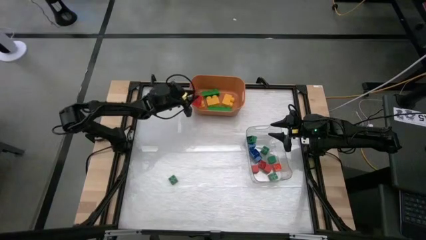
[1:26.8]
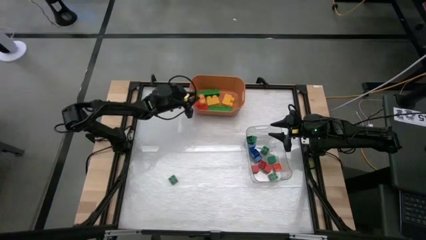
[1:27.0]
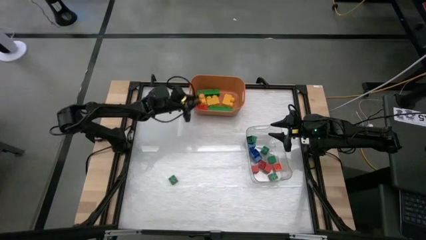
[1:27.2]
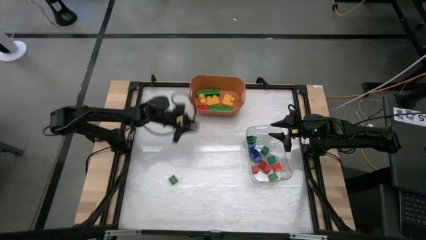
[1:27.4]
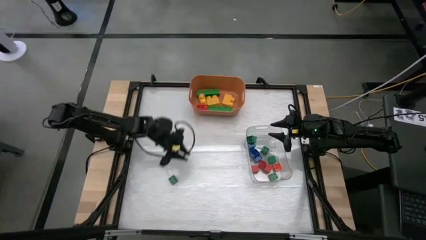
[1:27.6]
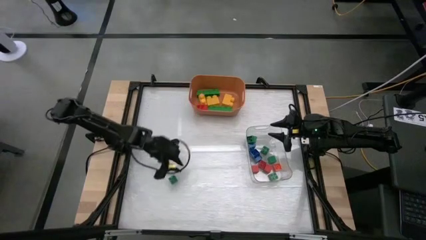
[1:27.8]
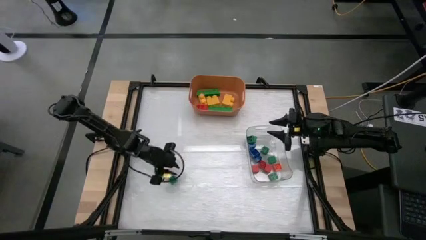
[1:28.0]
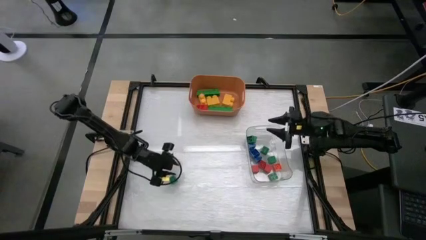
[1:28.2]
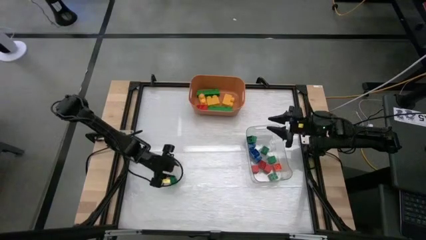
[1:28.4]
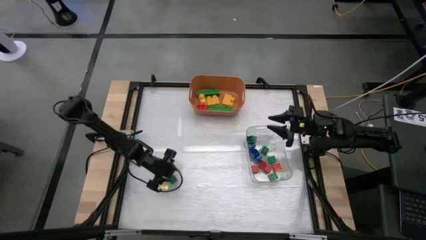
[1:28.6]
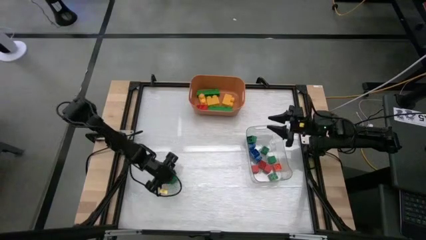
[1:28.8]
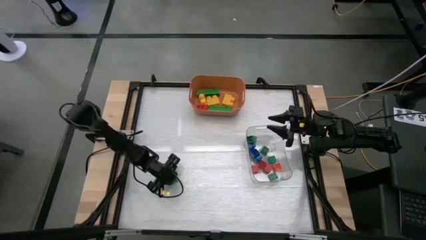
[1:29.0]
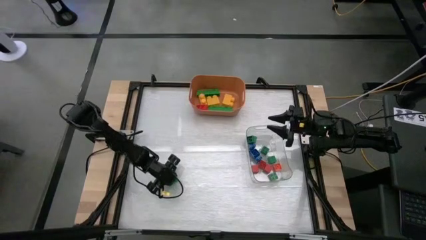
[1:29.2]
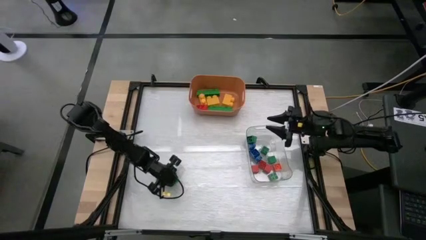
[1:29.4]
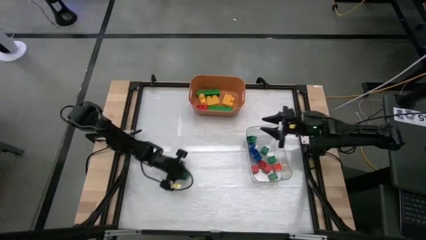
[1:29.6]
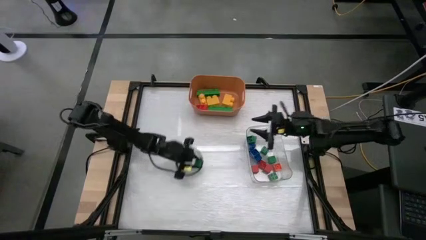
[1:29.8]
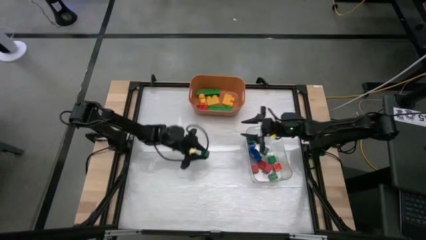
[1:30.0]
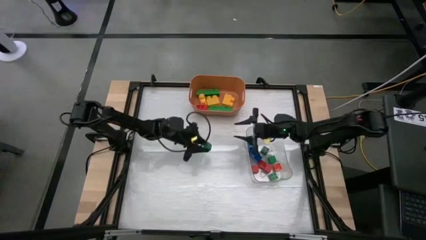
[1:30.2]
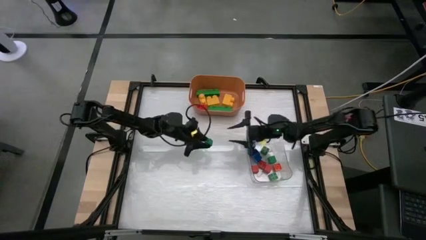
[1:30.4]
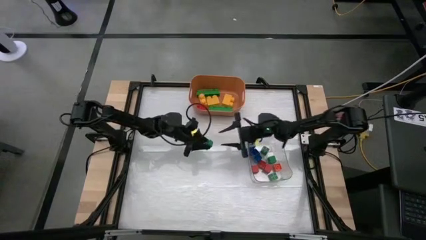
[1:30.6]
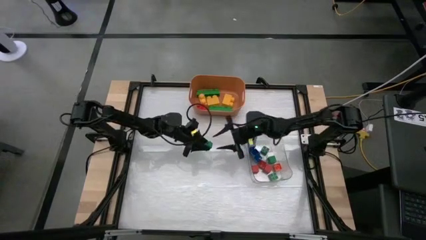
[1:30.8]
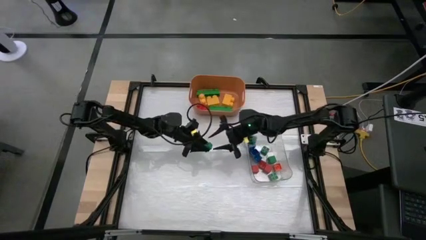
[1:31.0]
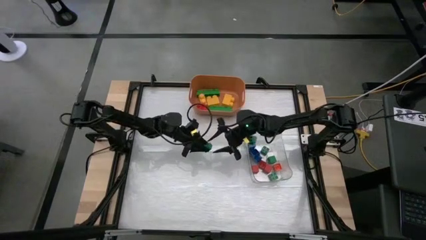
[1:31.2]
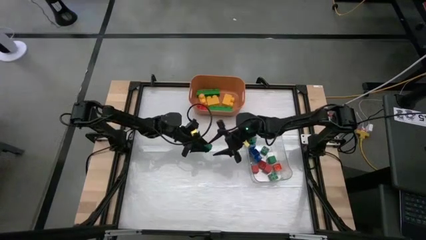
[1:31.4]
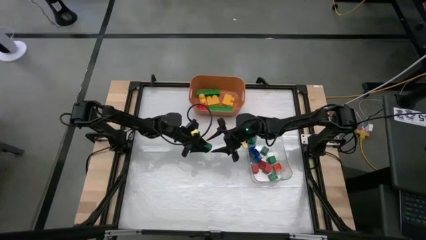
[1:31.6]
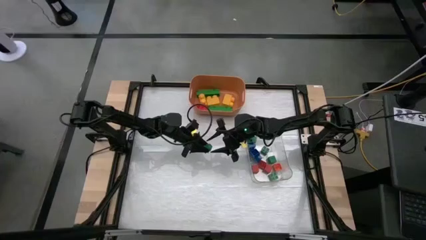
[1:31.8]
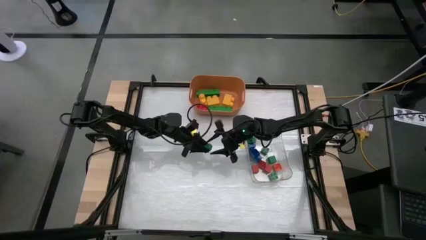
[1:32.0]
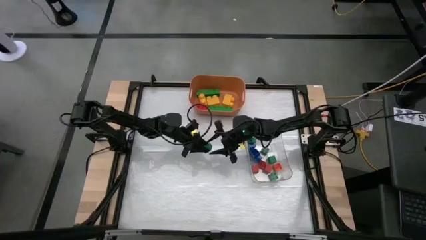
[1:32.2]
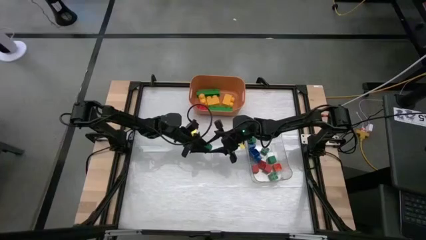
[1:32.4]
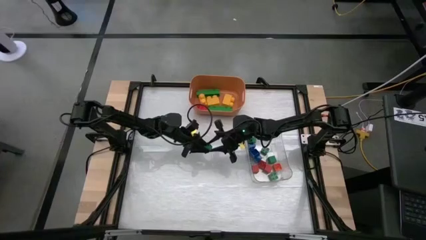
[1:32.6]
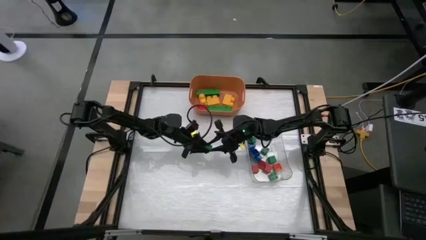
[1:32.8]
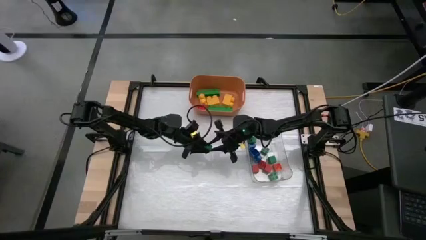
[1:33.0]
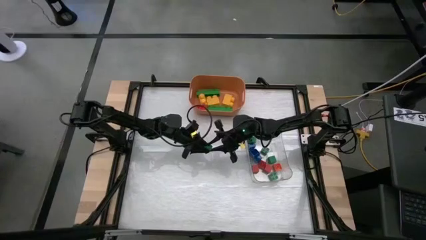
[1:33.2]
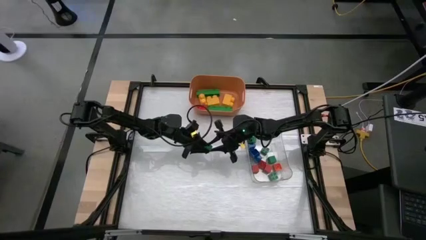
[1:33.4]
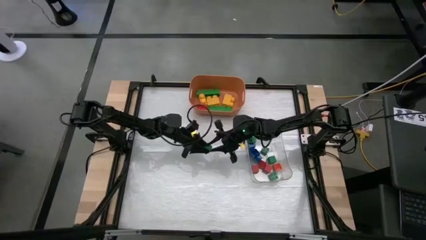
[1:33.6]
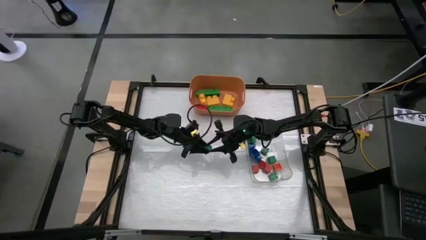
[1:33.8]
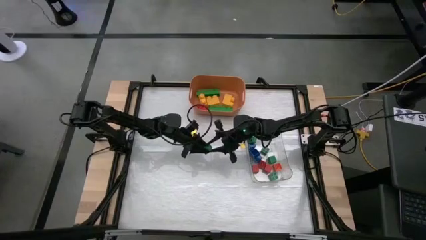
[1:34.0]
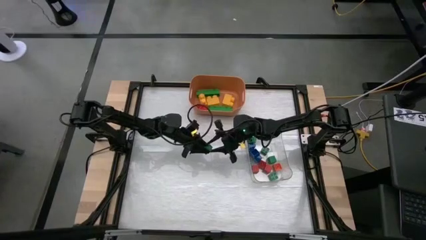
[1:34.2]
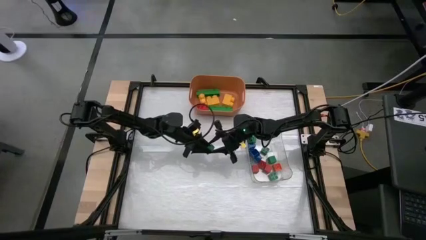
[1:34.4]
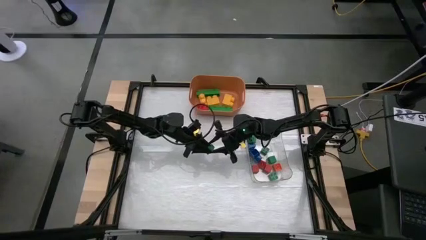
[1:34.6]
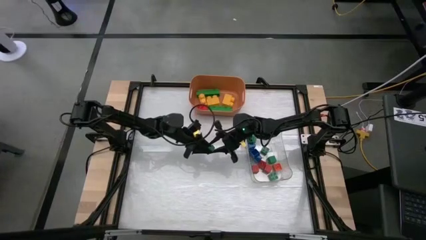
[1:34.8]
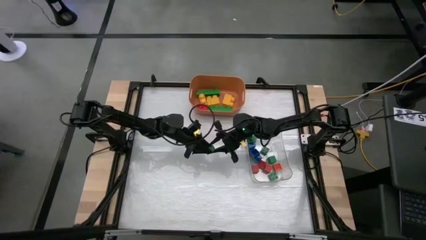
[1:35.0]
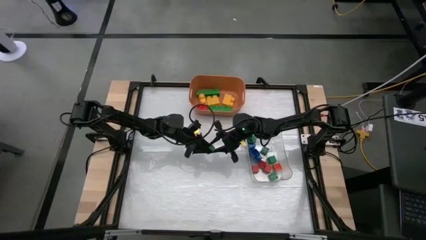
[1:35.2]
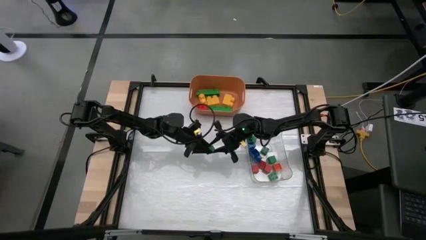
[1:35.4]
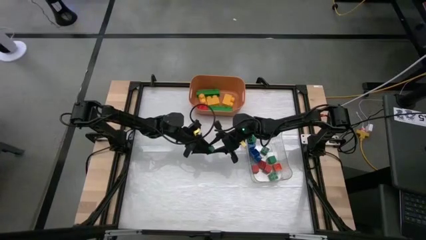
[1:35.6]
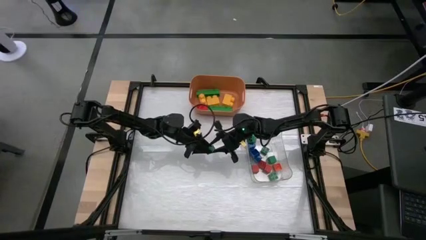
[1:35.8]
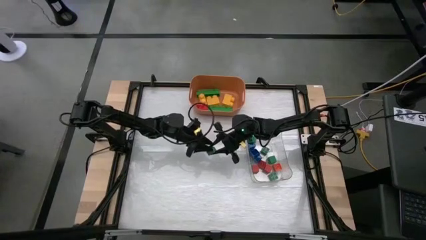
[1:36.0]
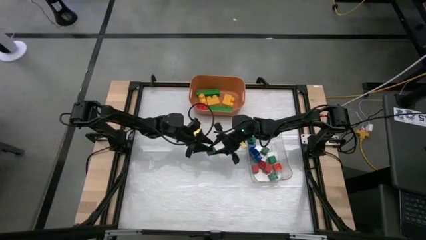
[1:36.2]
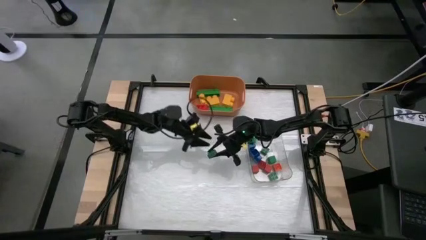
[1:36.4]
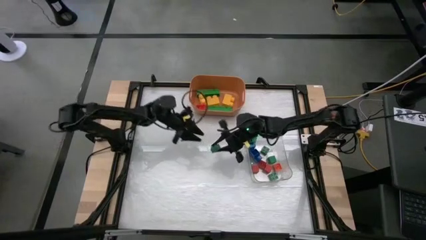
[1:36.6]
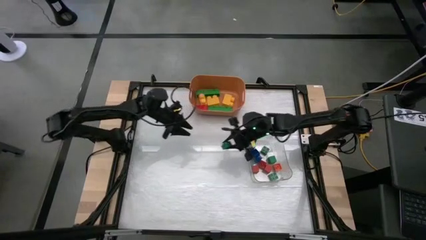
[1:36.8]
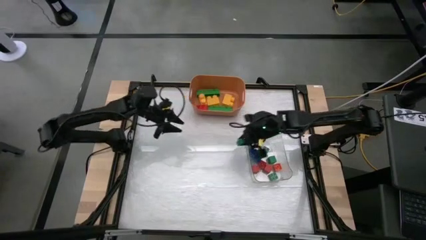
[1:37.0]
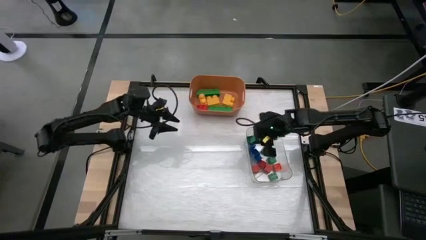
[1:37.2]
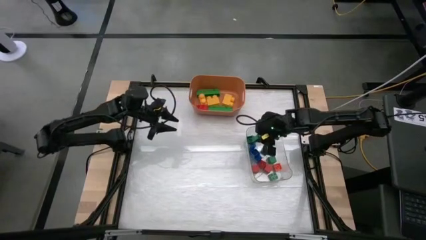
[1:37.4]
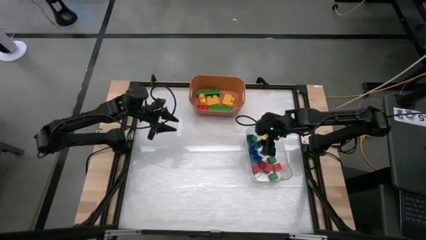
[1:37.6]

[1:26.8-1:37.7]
Task: Sort blocks by size
Put the small green game piece into the transparent bin

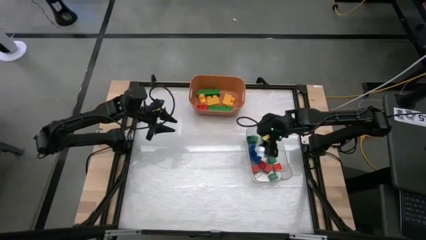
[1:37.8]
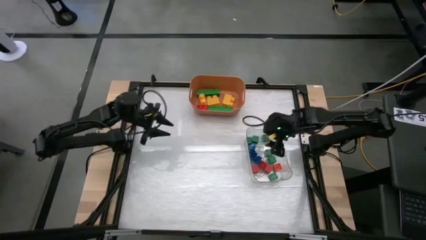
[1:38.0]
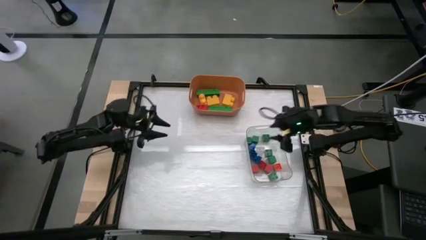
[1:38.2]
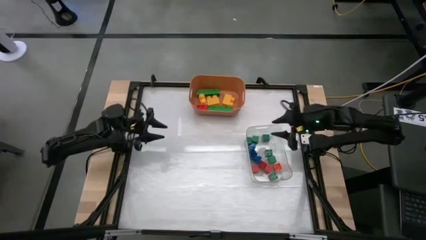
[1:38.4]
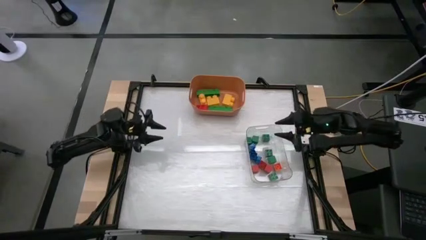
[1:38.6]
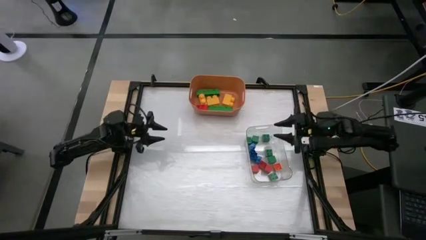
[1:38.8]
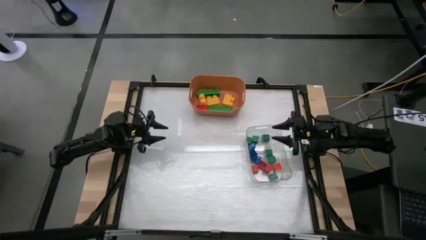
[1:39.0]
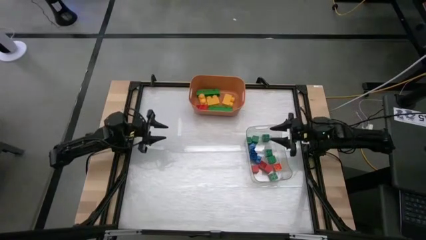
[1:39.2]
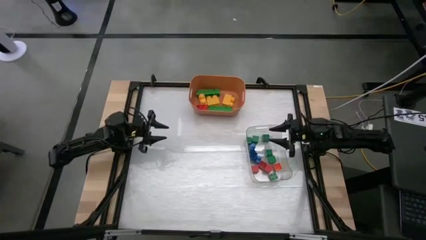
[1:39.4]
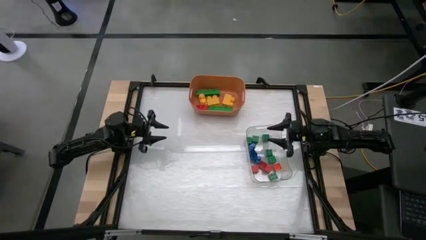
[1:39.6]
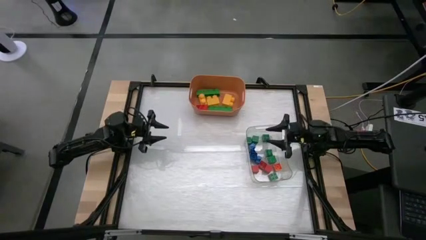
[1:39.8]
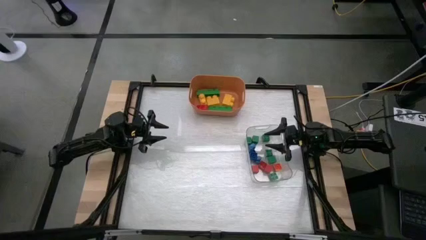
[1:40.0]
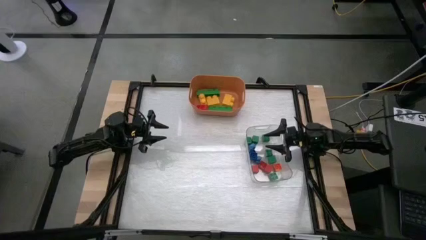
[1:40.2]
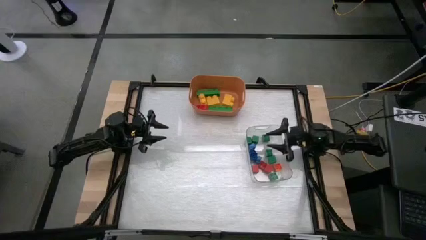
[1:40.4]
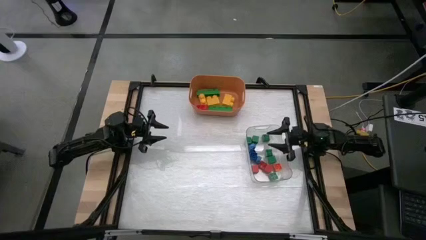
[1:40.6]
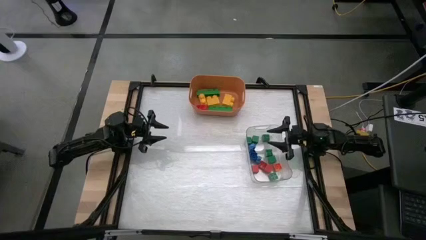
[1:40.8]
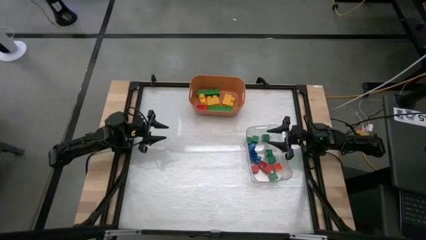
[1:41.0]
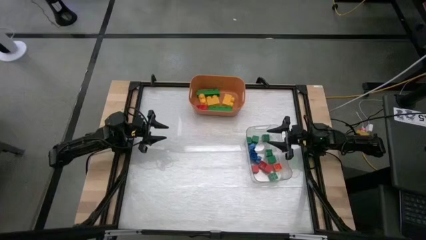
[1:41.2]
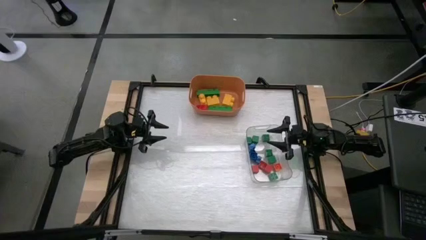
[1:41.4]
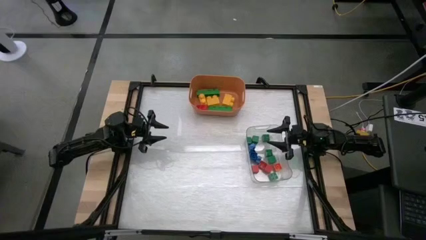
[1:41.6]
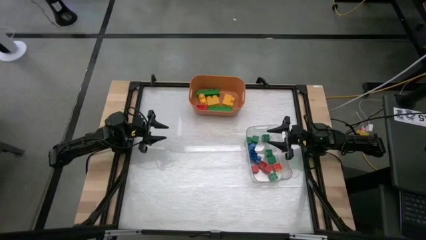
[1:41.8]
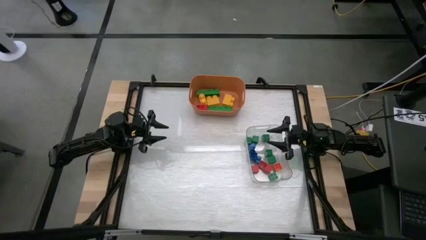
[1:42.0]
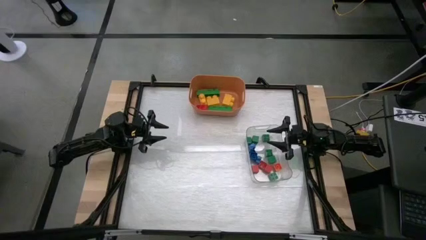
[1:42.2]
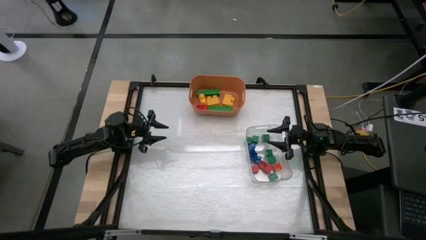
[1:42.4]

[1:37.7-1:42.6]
Return to Home Position
